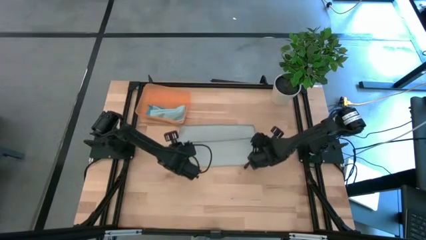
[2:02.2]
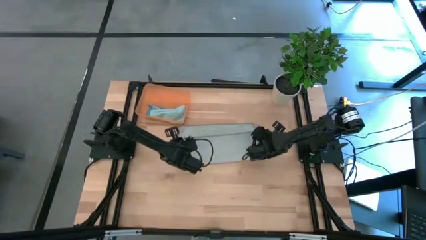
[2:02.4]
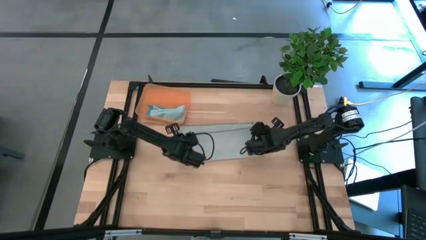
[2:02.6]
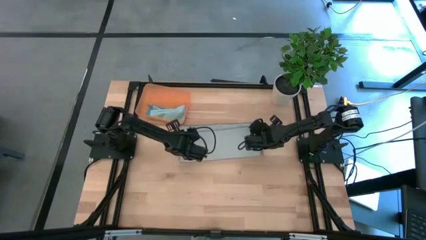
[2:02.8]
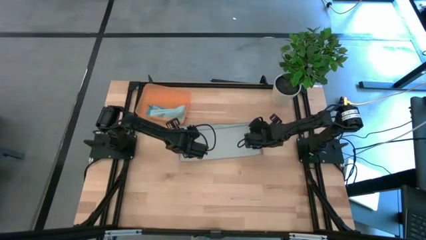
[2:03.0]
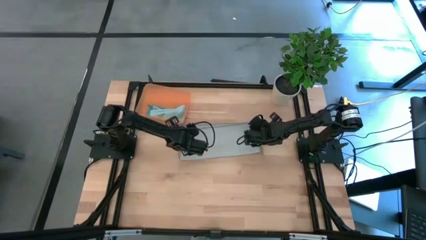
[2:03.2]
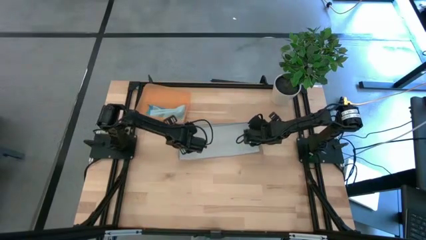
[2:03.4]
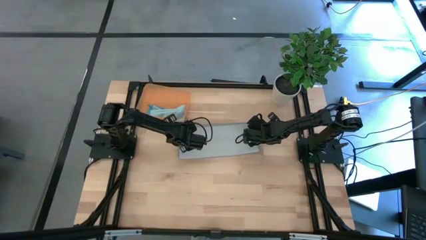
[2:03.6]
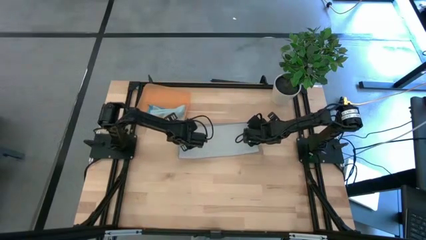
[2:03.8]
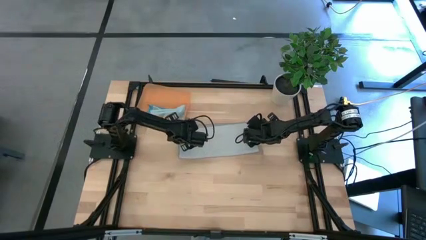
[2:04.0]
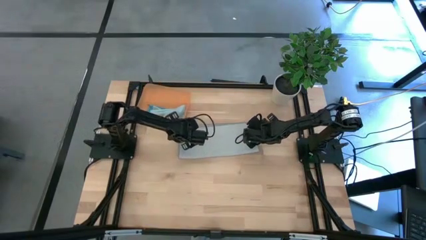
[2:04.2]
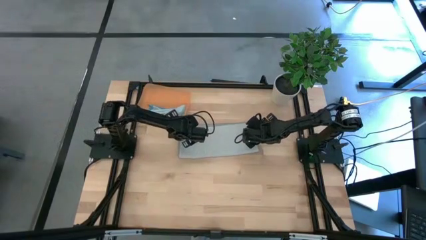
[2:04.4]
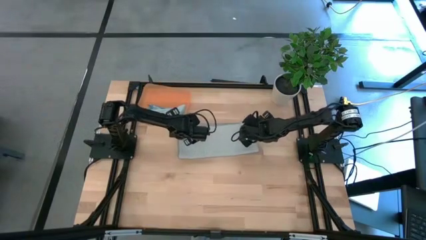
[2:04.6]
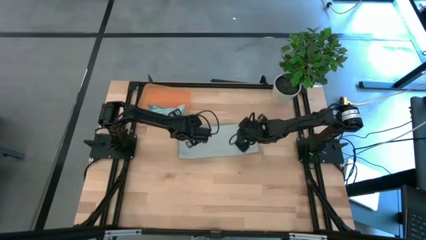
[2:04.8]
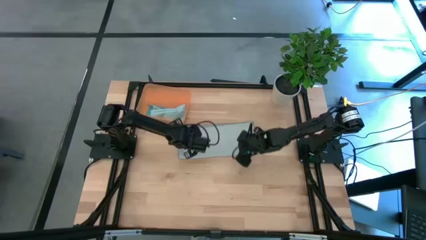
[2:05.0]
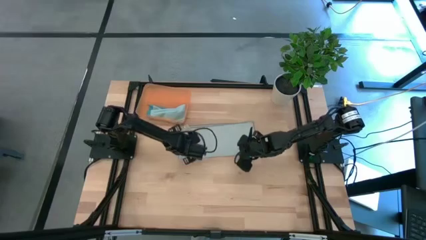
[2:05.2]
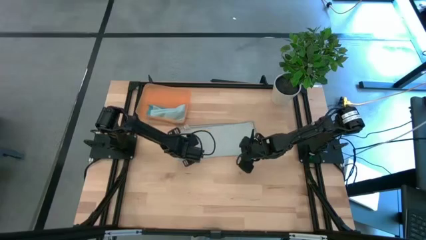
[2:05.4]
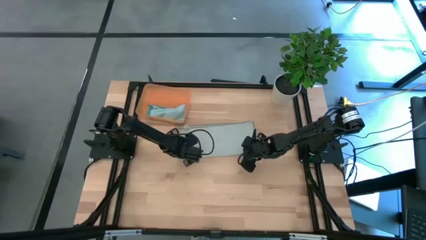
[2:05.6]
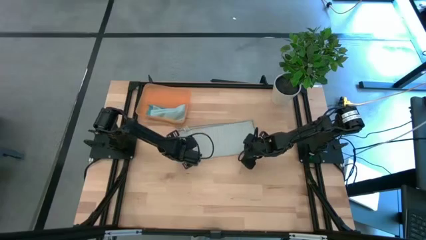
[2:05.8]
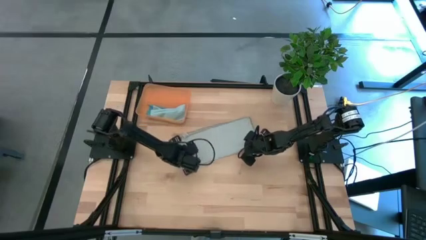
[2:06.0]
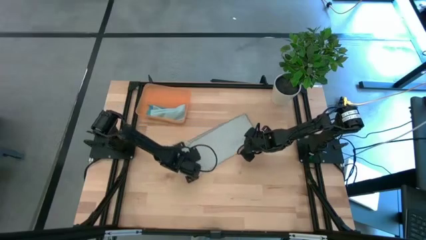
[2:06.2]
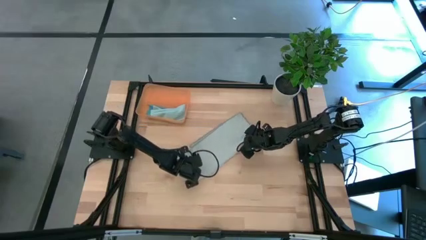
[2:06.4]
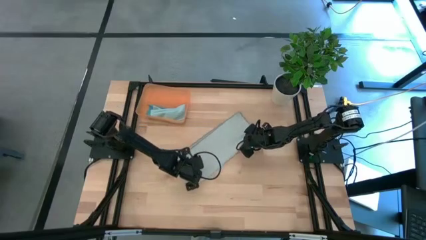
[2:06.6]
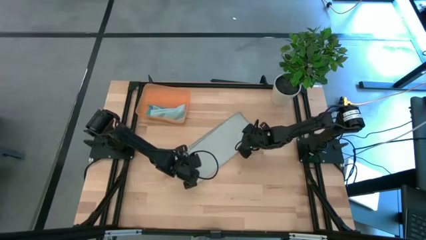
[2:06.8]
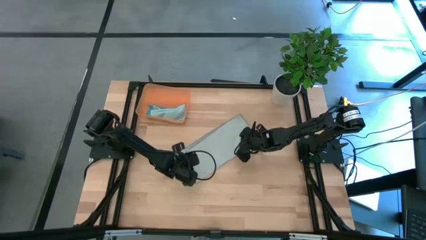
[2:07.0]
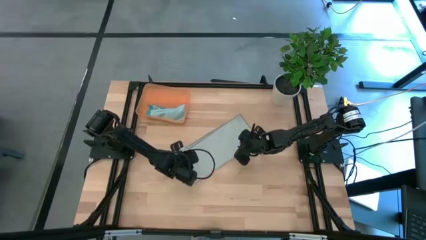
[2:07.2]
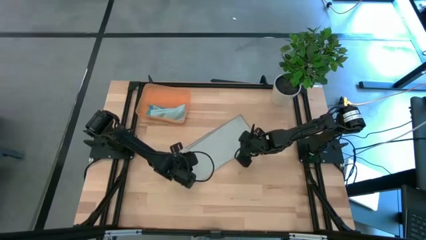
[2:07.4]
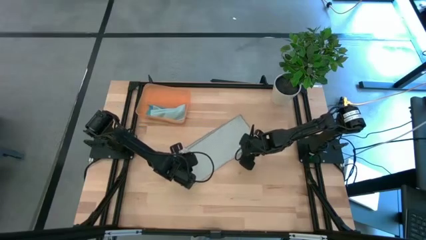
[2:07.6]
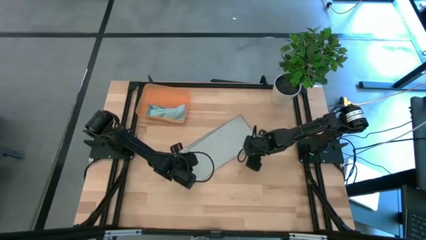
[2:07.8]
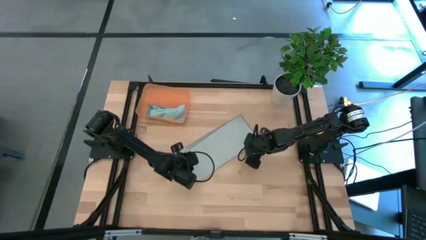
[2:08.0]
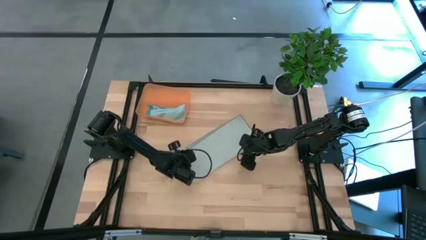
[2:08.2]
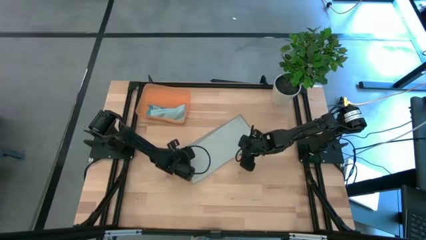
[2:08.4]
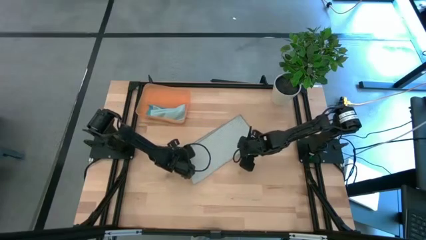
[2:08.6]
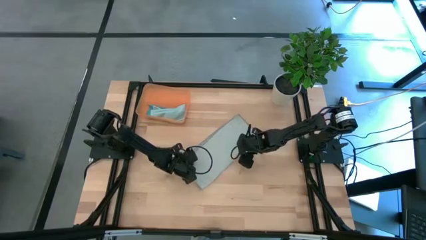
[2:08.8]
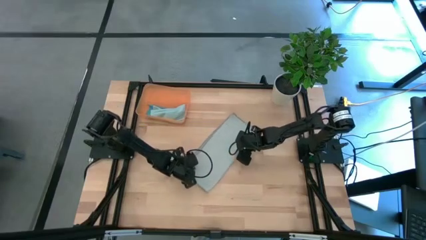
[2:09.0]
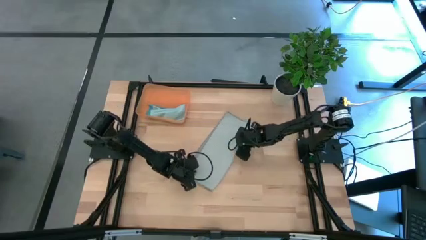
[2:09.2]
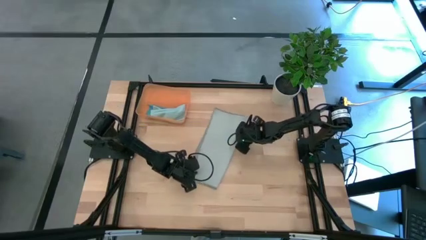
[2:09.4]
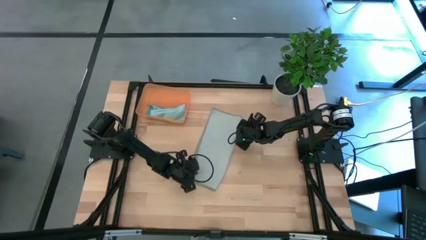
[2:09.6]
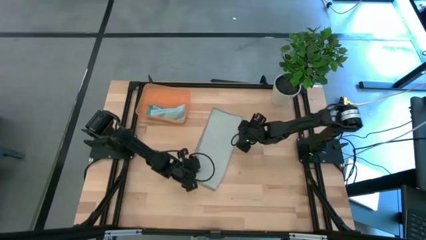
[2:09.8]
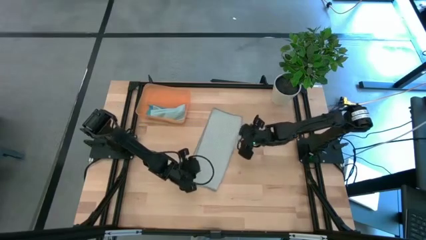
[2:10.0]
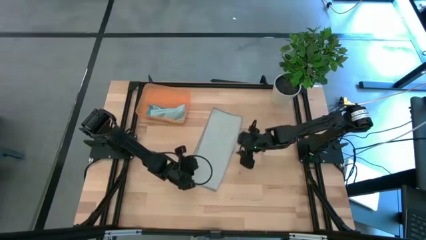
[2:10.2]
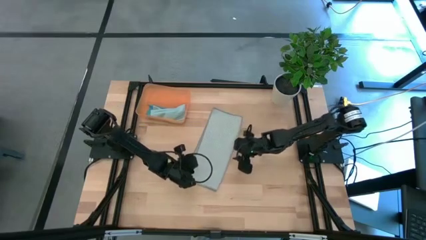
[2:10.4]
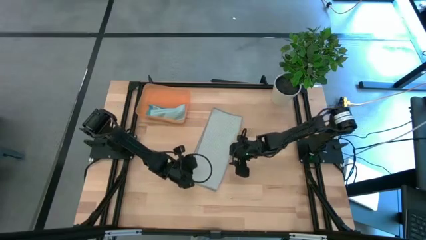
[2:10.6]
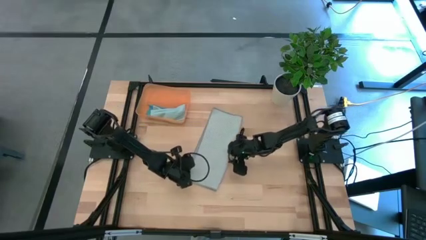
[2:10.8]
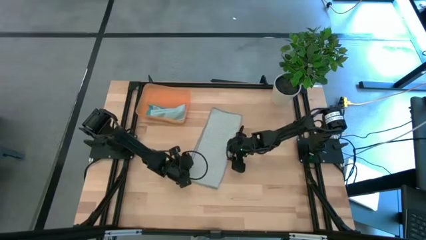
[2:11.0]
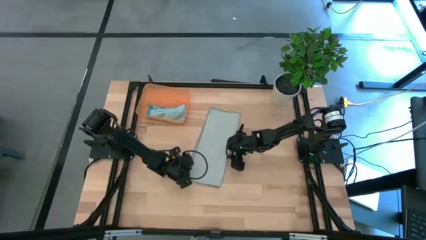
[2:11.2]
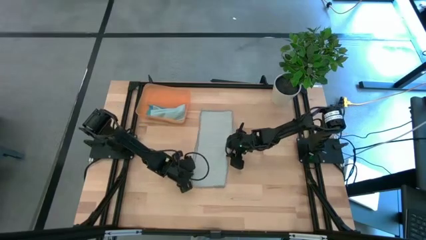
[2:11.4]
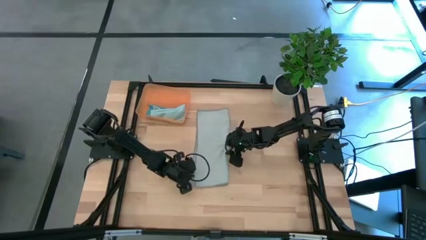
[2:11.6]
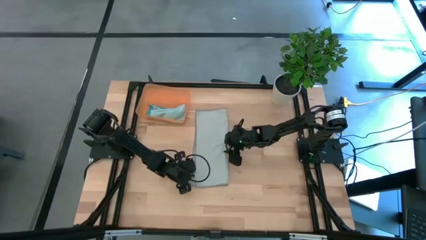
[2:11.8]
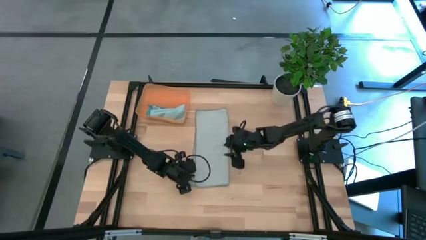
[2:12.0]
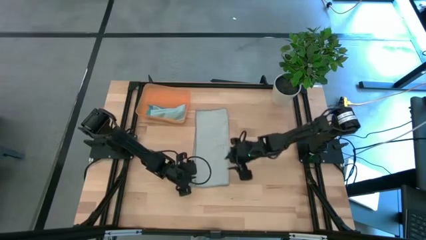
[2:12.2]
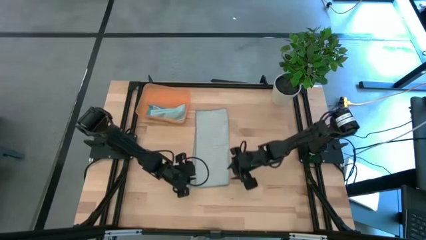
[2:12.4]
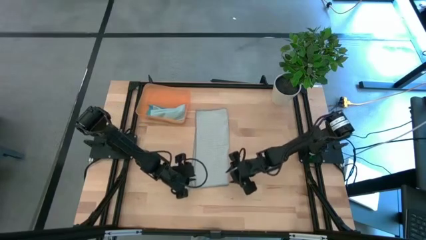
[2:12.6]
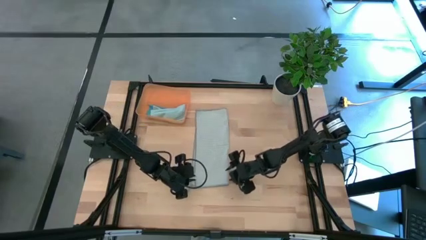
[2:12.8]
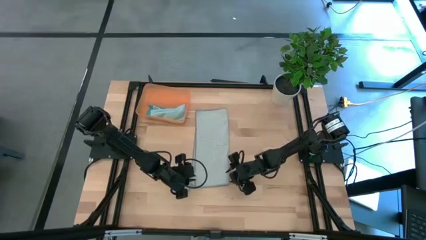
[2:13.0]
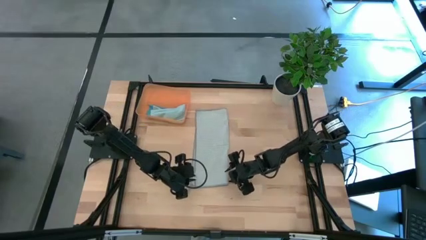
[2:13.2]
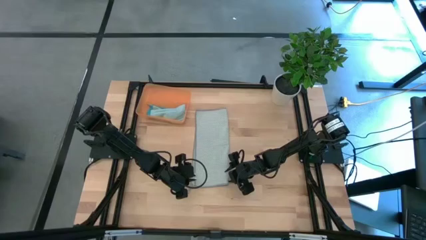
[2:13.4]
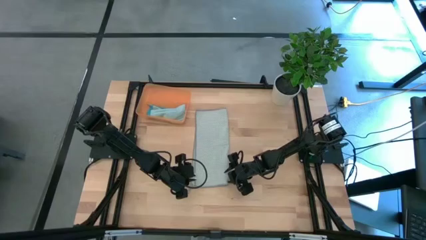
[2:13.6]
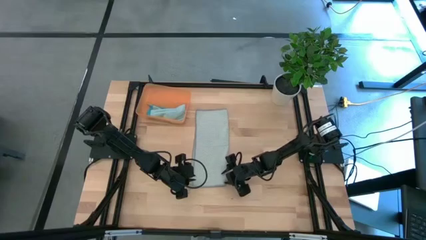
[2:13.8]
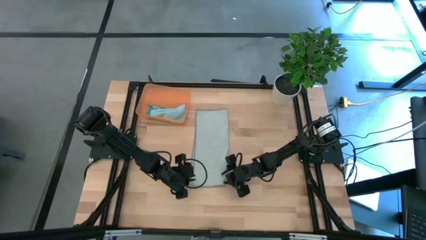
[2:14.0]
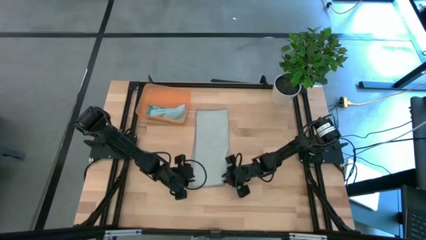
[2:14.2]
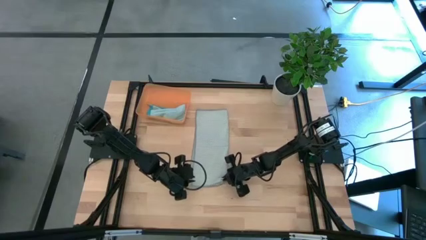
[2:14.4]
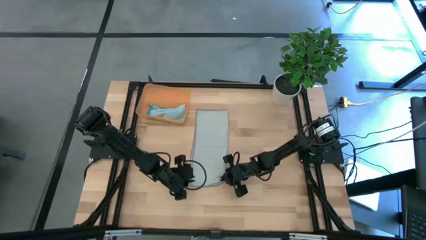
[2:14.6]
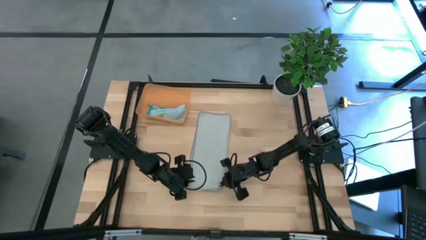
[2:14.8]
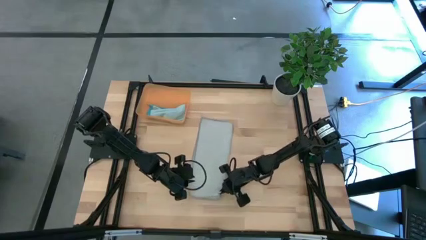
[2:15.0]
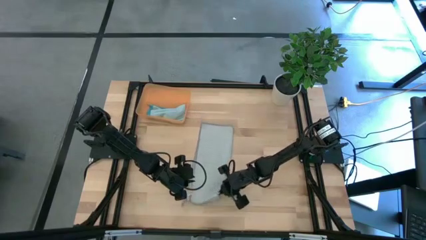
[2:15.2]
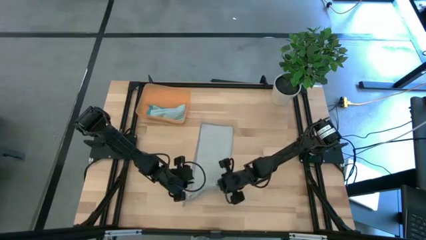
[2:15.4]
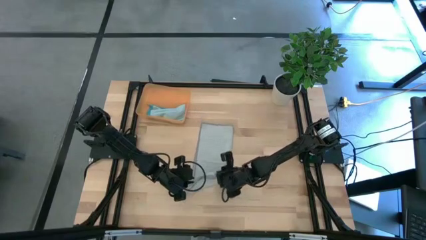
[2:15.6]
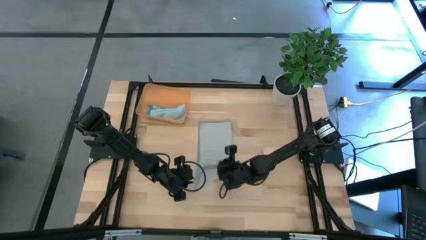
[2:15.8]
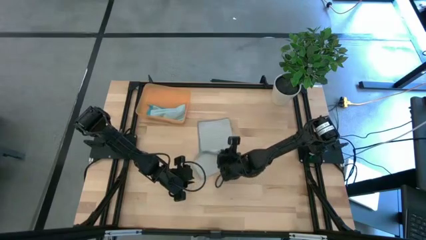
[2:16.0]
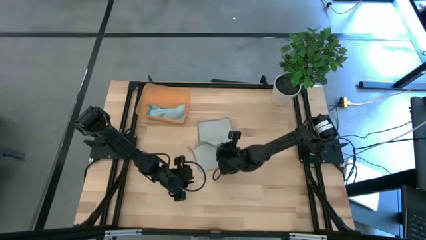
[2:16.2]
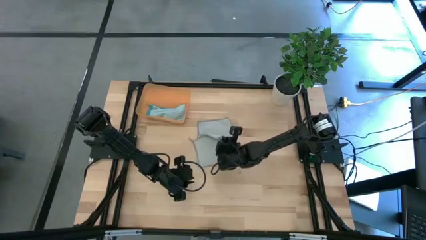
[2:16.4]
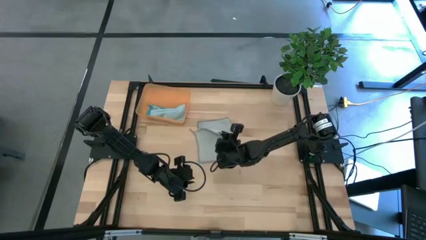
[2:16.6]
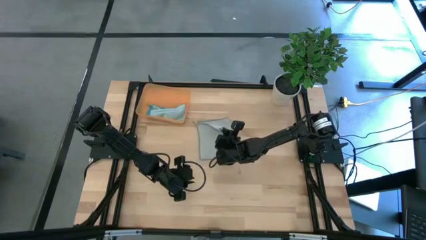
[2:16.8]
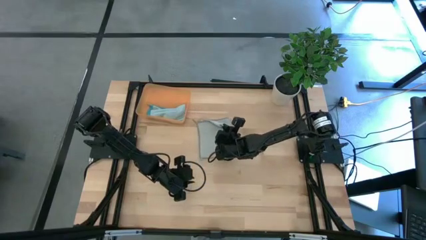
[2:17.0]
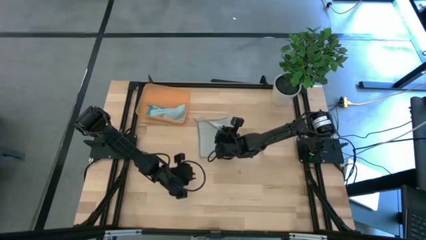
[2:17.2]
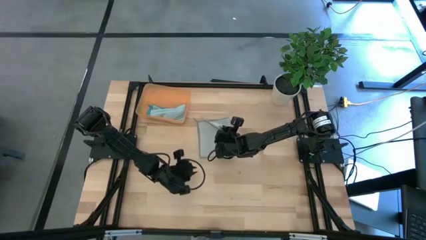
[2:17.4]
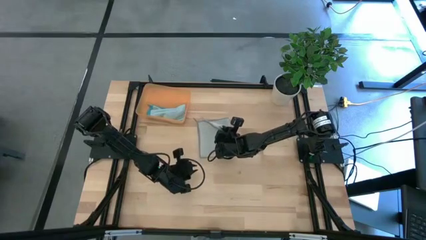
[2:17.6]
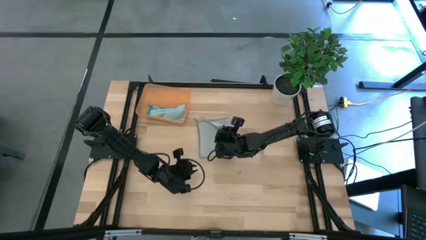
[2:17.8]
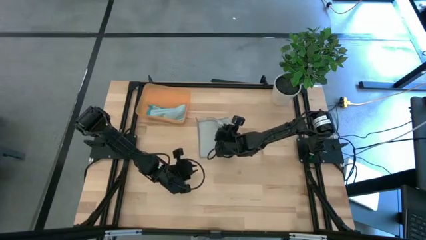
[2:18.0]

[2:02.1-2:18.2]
Task: Roll microfiber towels into tight, uniform cylinder then place into a basket
Fold the gray microfiber cloth
